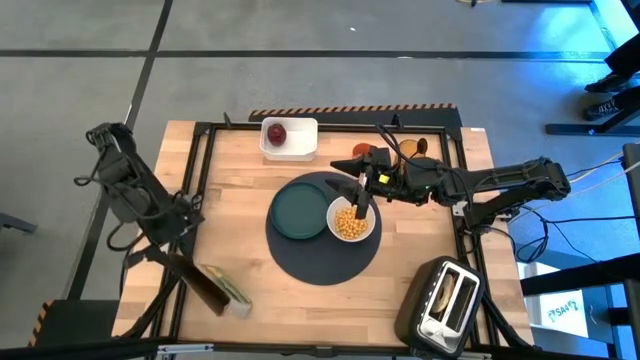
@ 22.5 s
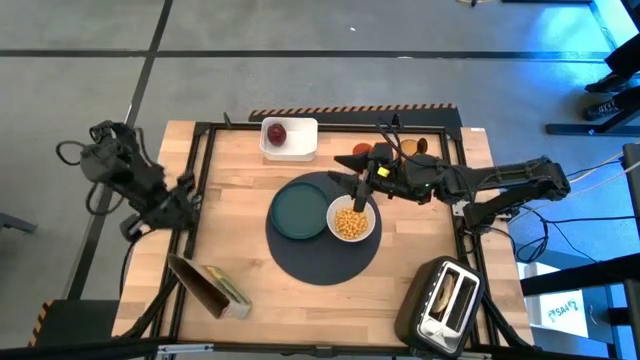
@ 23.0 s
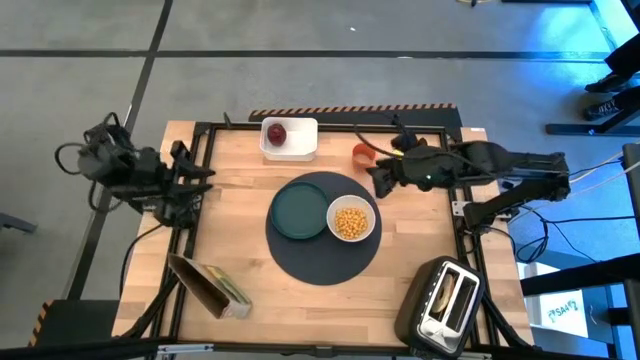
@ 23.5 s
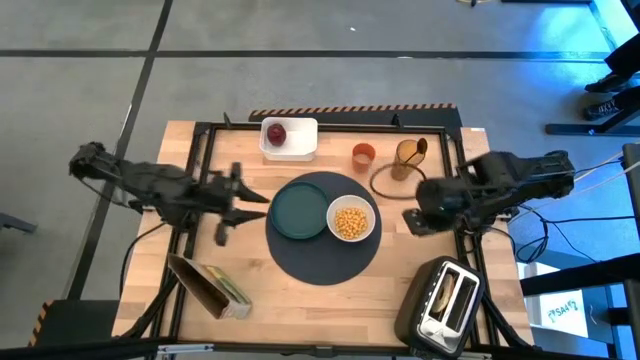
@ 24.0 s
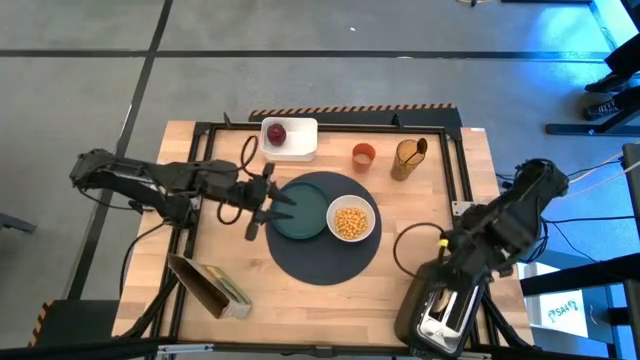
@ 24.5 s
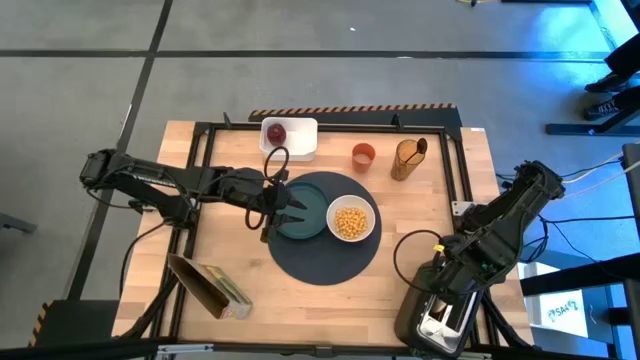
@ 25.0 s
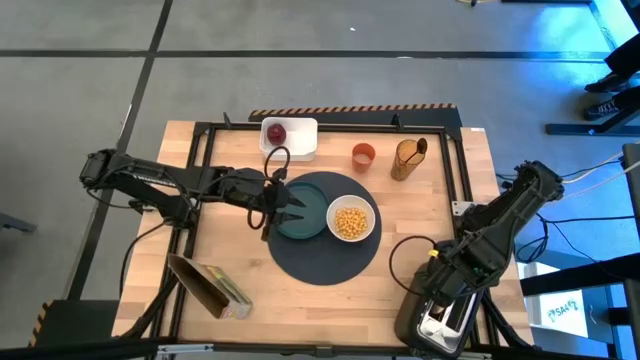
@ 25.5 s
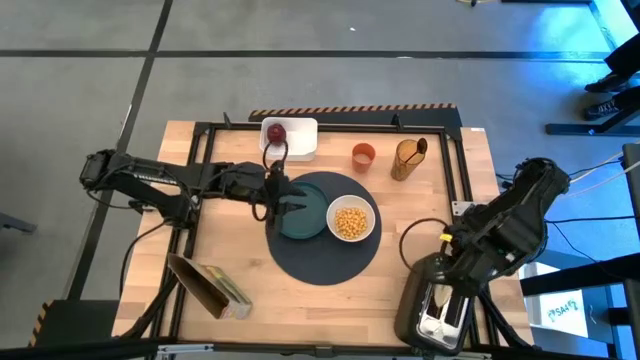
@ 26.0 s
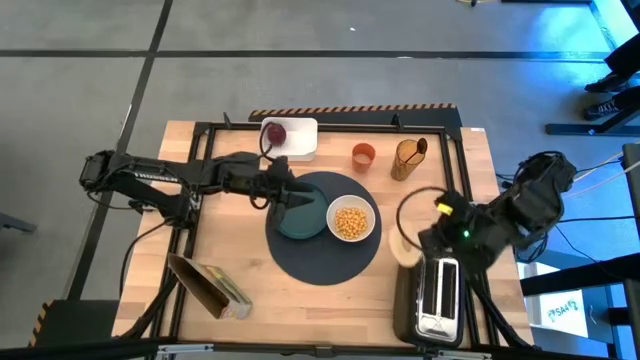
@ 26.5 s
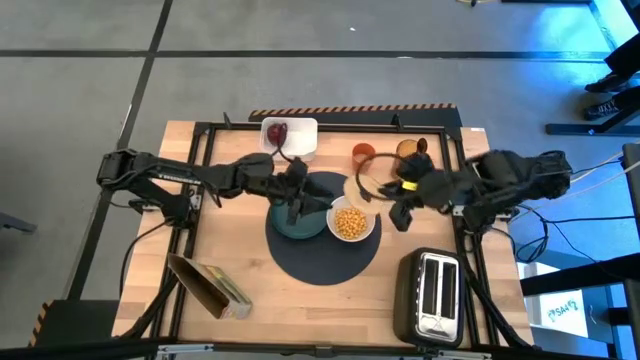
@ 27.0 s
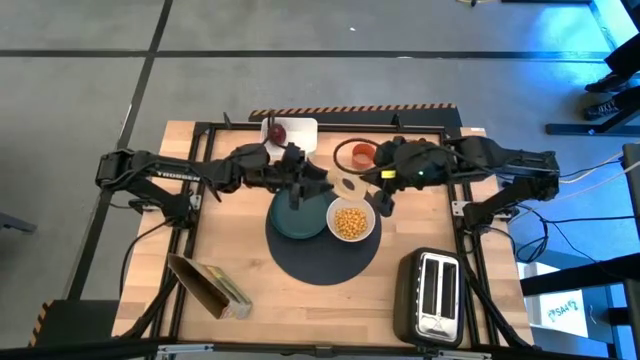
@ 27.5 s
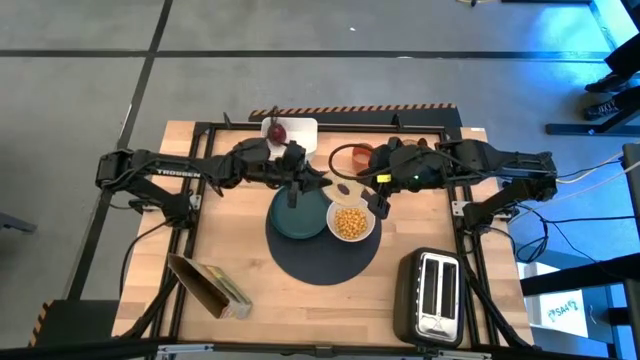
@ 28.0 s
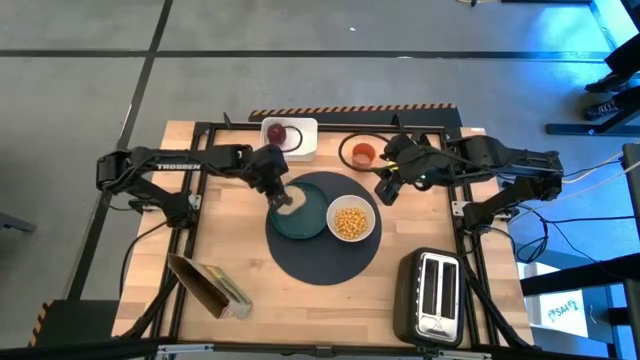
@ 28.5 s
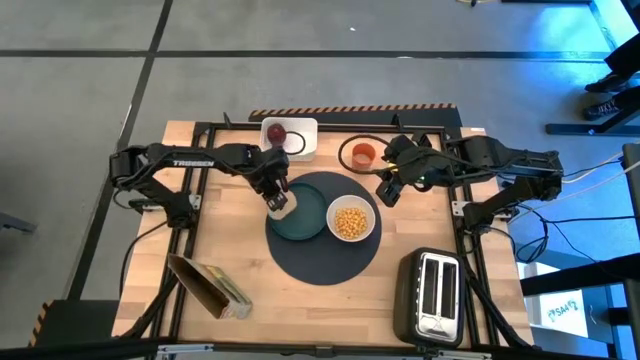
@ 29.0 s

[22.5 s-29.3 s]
Task: Arrange a breakfast setting
Put the toasted bagel on the green plate

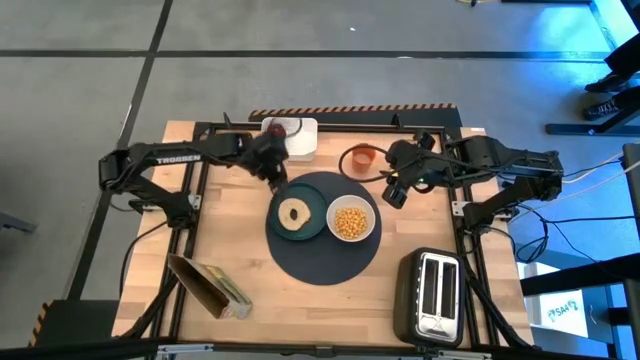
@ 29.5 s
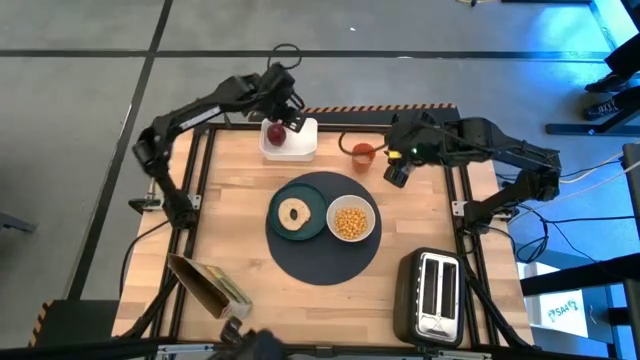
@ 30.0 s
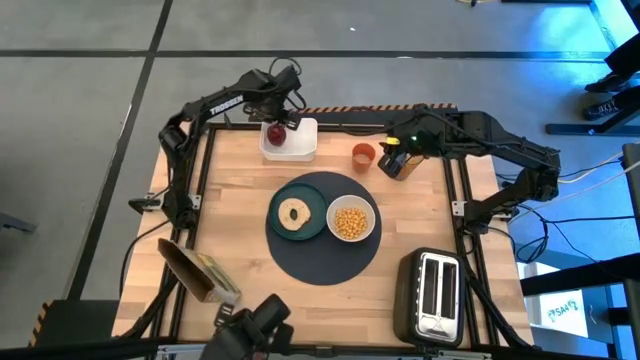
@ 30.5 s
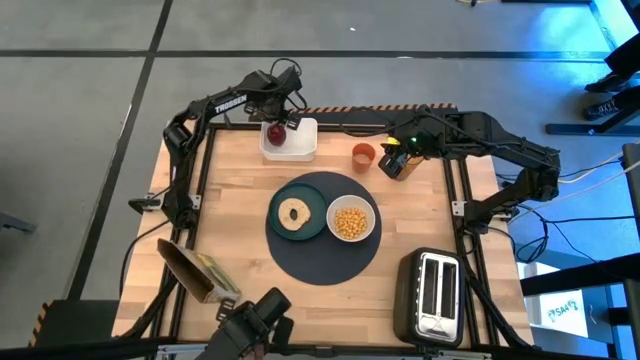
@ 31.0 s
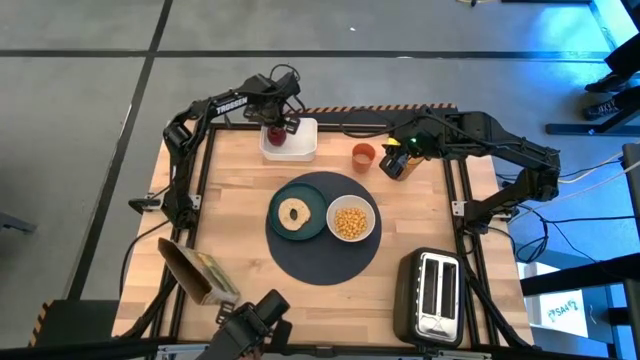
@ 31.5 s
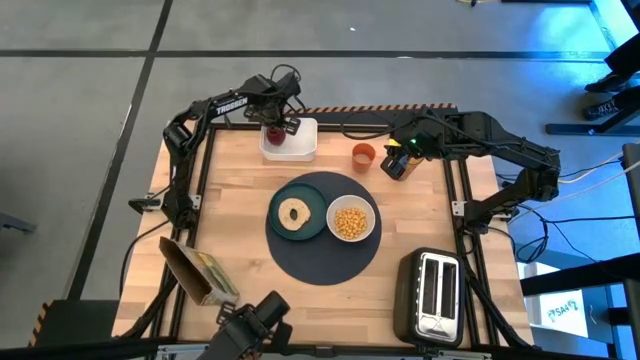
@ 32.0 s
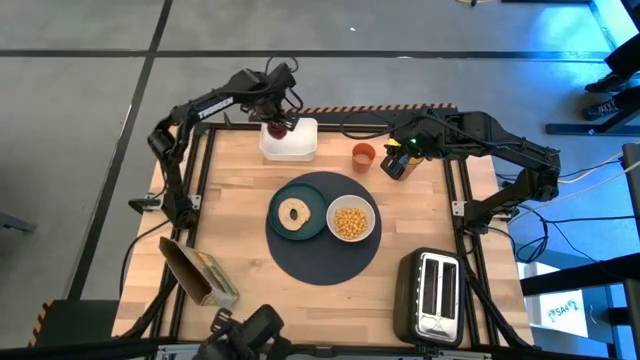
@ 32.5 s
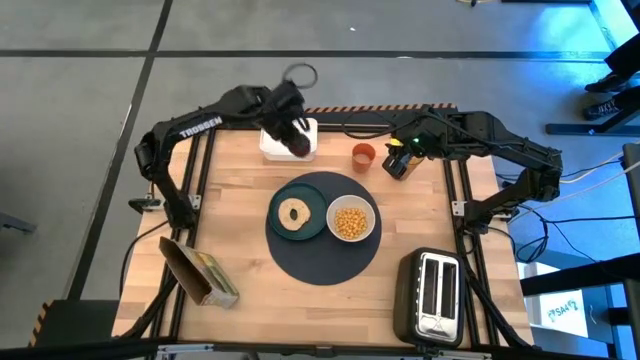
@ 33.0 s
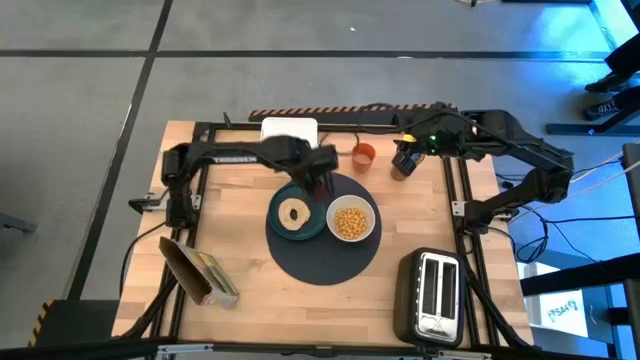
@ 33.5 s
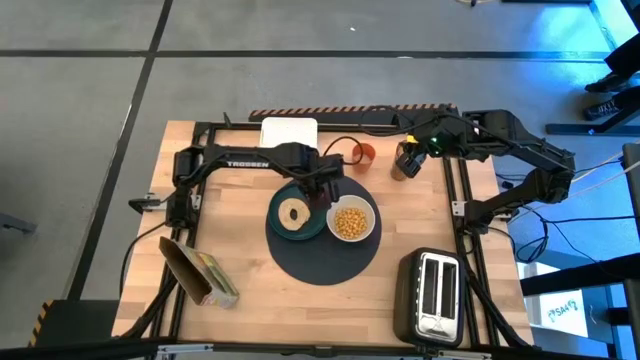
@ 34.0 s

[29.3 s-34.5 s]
Put the apple on the green plate

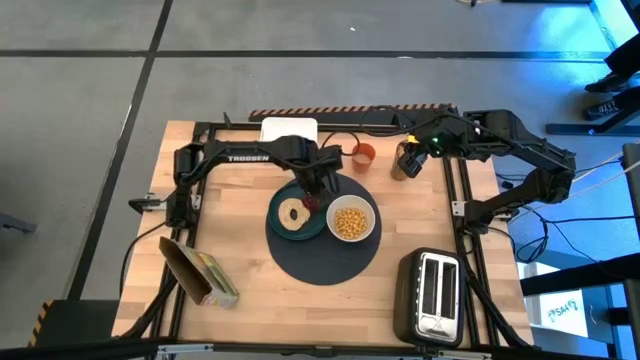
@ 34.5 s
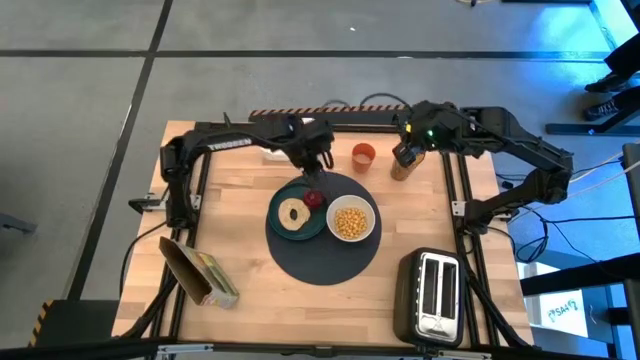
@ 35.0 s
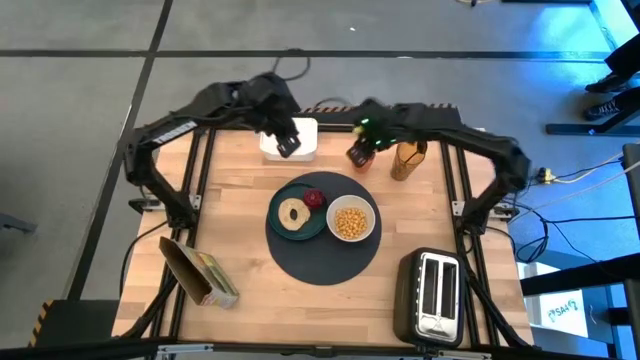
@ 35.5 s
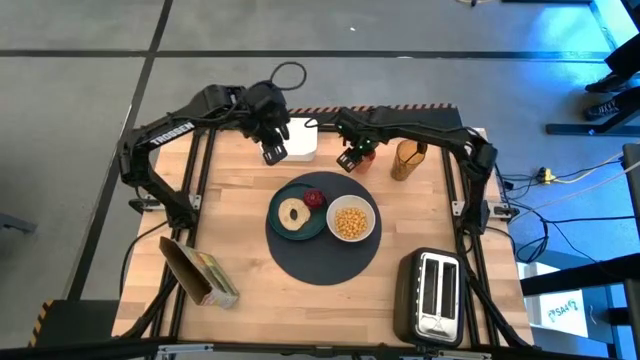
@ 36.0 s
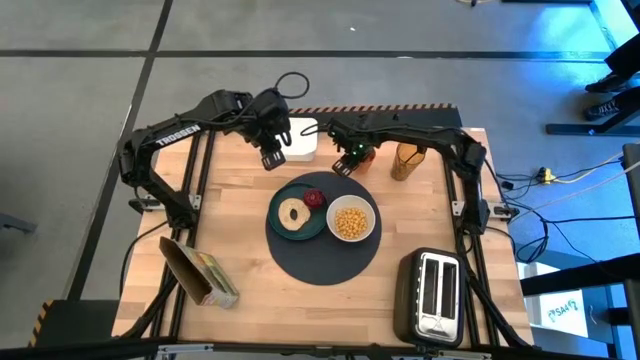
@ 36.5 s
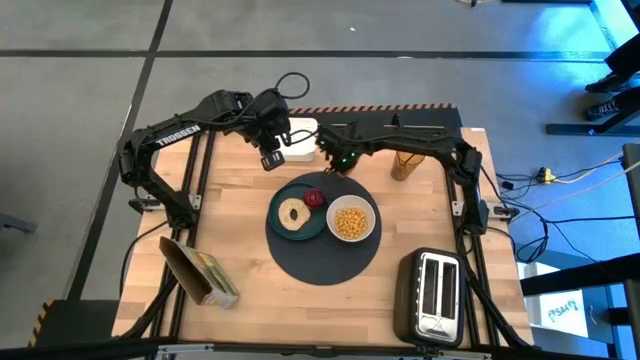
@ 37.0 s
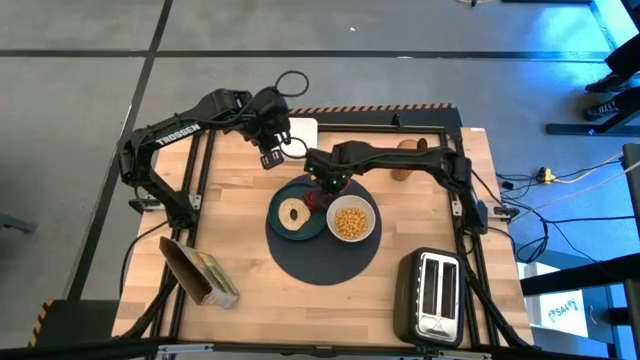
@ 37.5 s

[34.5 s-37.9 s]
Put the orange cup on the placemat

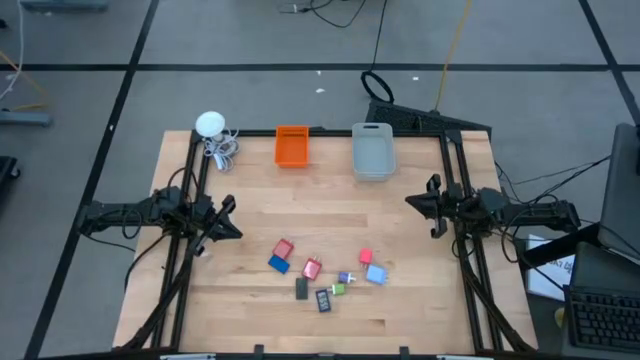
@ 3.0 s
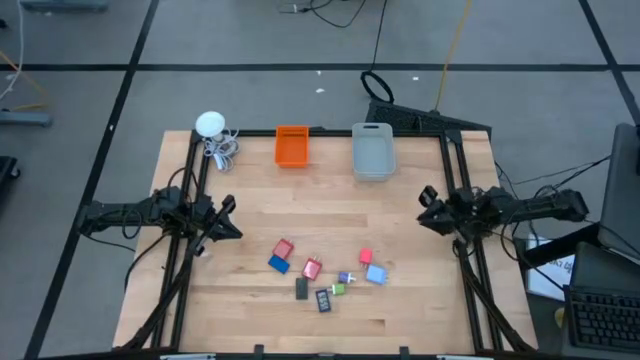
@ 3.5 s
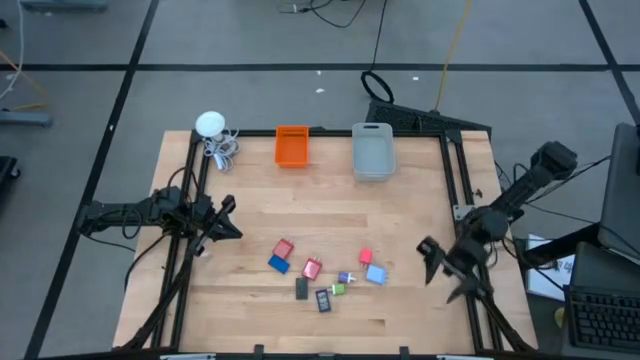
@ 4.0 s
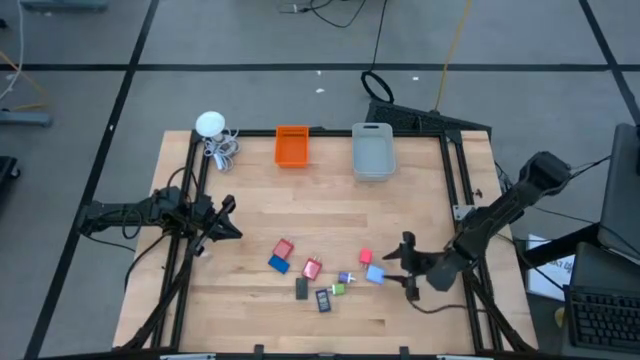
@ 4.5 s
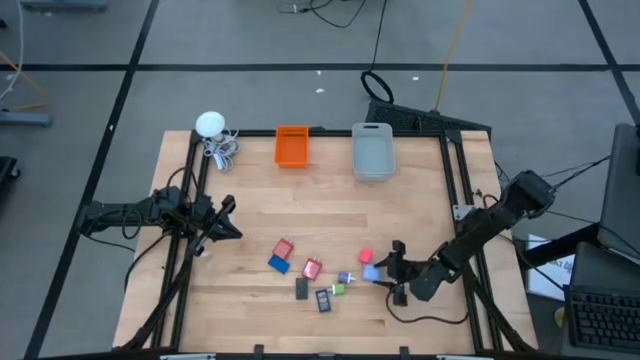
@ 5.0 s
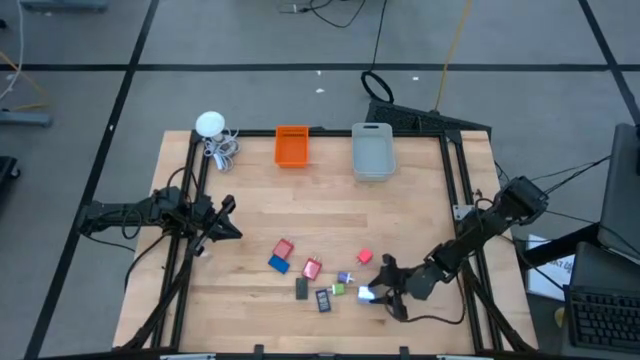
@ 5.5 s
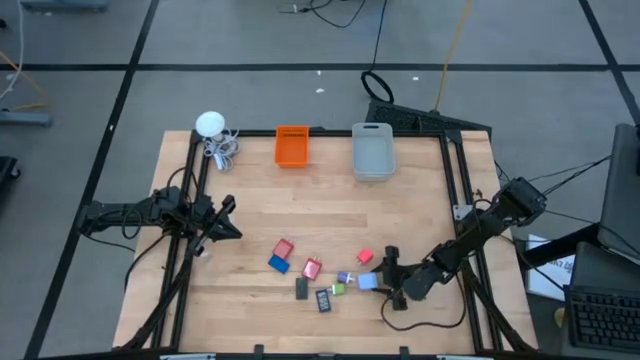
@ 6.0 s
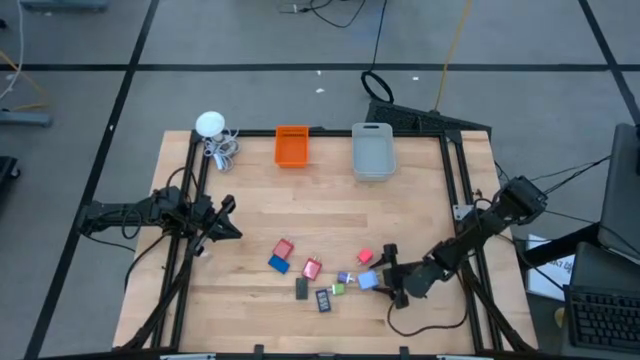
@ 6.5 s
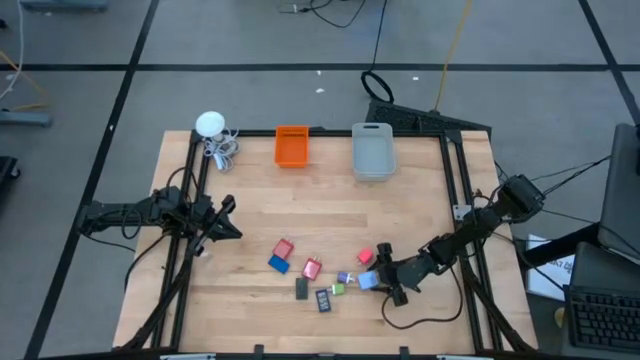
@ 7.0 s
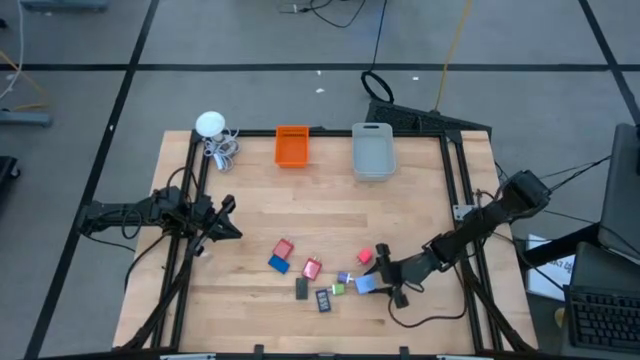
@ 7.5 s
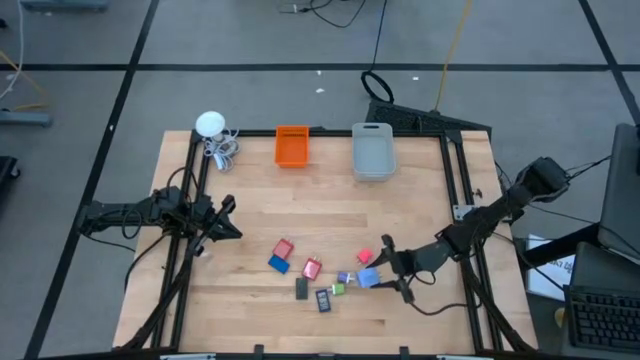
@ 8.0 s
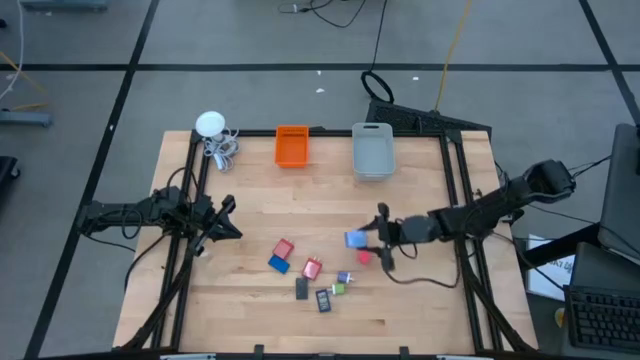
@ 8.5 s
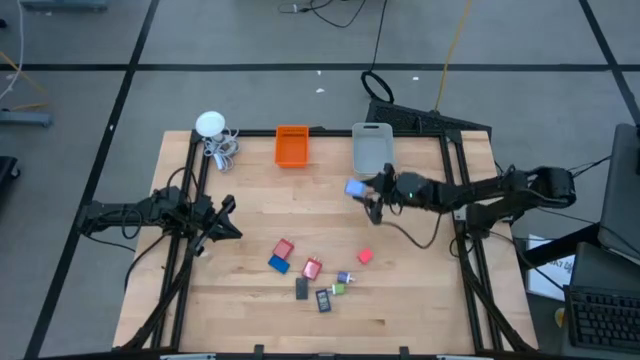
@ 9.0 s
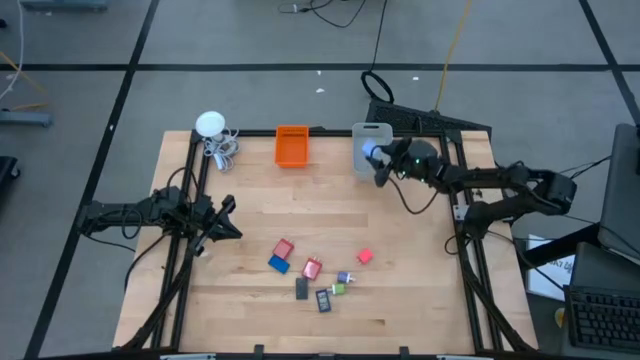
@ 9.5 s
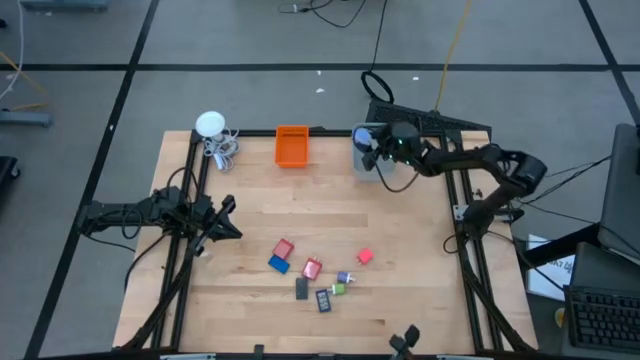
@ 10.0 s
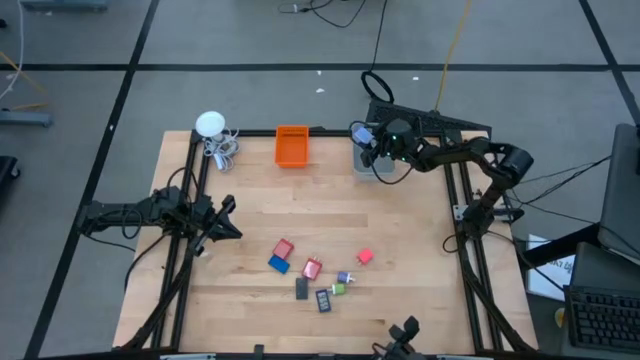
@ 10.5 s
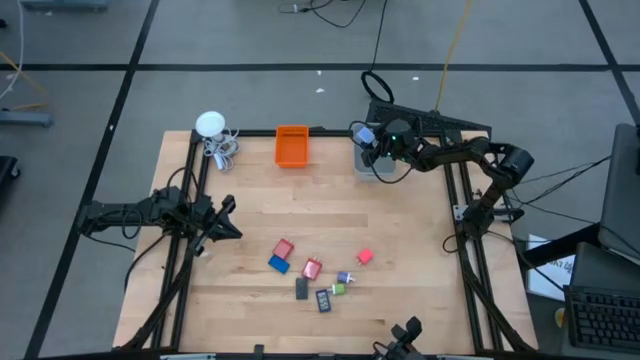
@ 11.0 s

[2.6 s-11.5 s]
Task: Pick & Place Office items
Put the blue charger adapter into the gray bin
